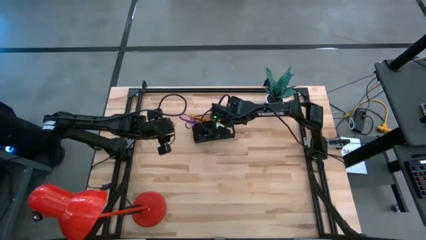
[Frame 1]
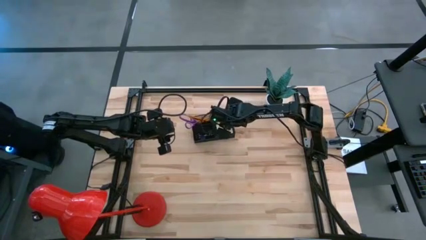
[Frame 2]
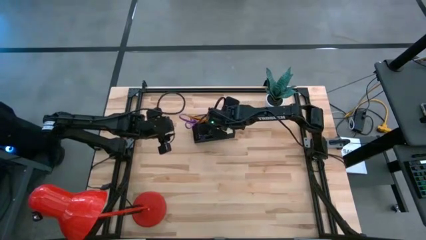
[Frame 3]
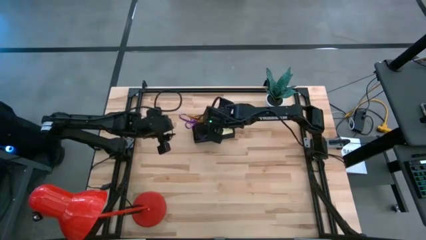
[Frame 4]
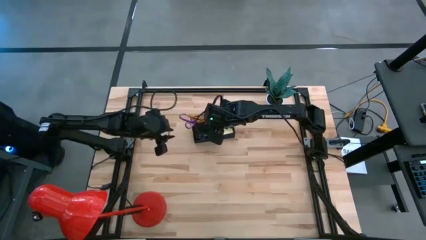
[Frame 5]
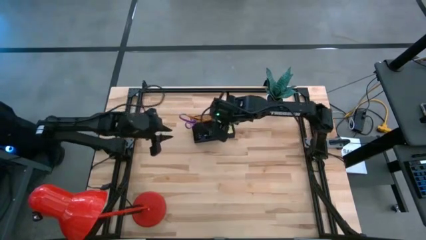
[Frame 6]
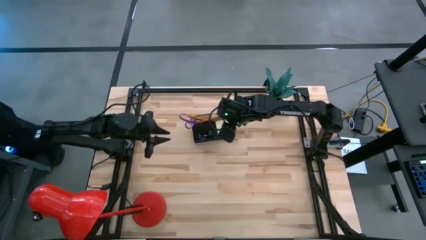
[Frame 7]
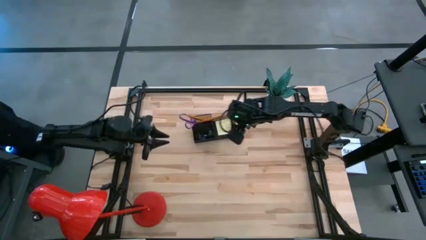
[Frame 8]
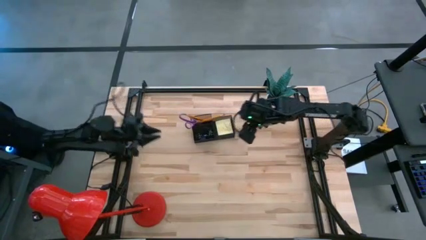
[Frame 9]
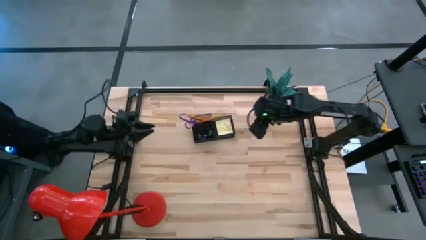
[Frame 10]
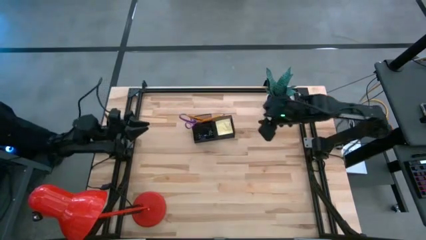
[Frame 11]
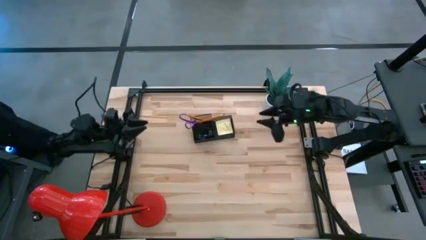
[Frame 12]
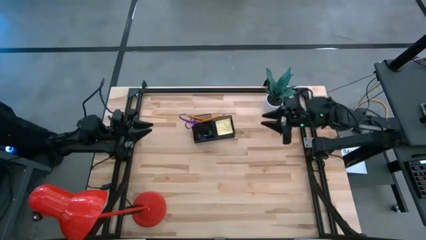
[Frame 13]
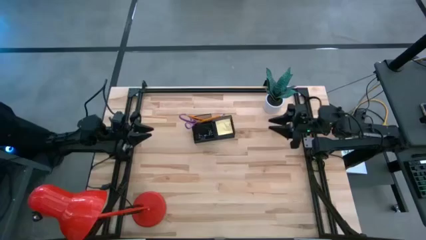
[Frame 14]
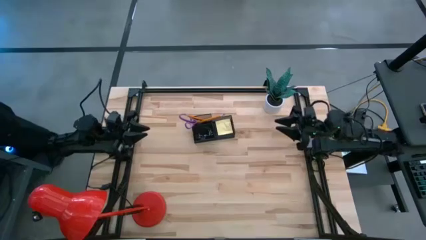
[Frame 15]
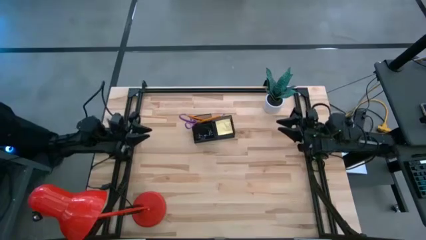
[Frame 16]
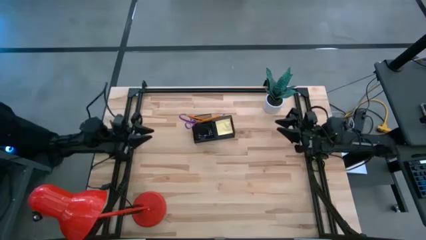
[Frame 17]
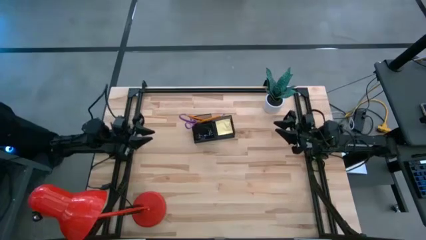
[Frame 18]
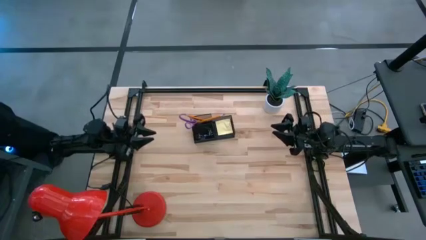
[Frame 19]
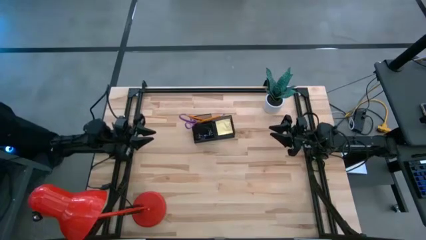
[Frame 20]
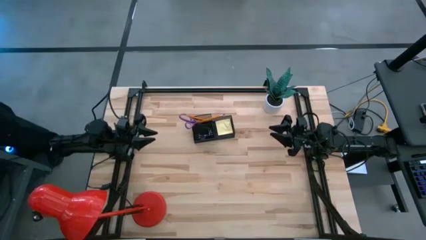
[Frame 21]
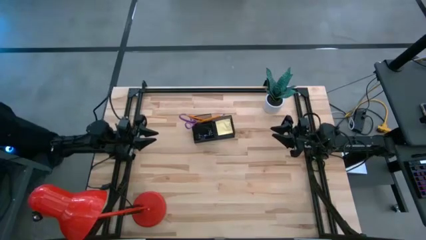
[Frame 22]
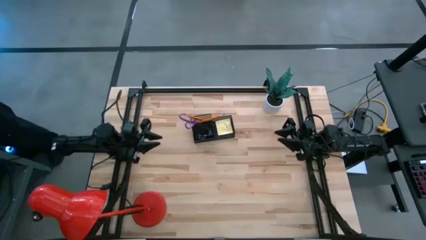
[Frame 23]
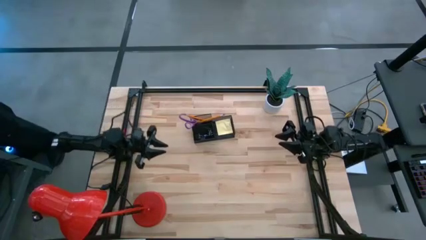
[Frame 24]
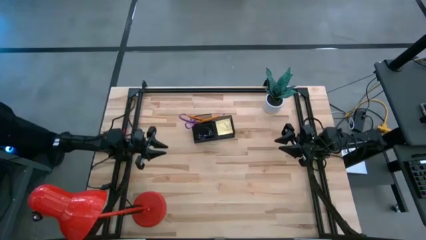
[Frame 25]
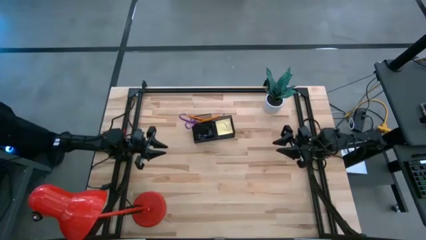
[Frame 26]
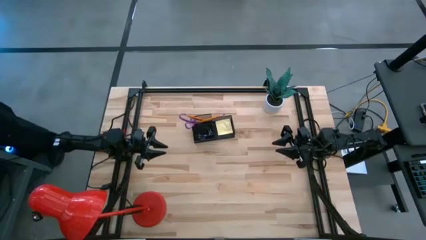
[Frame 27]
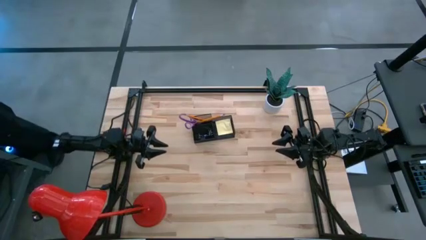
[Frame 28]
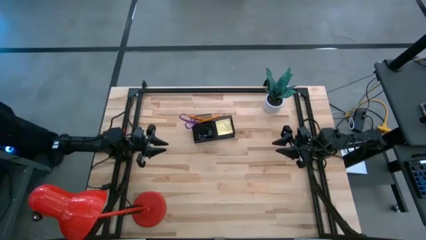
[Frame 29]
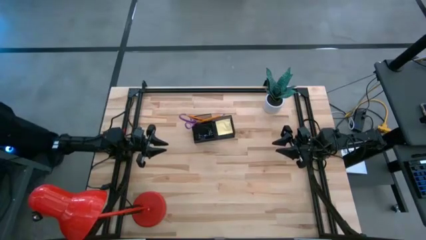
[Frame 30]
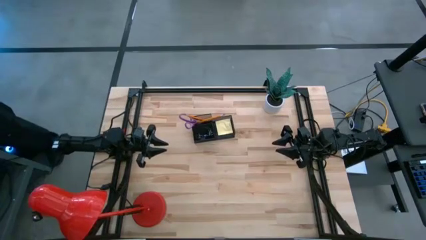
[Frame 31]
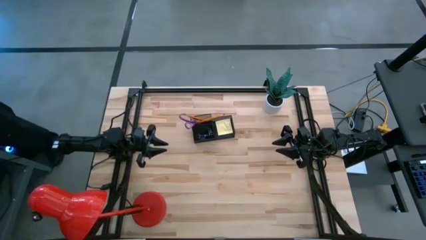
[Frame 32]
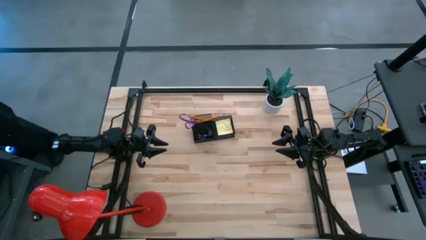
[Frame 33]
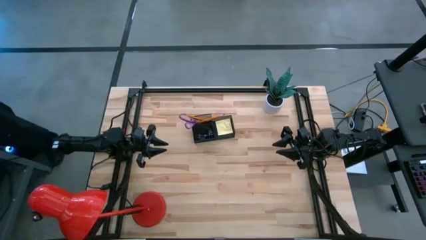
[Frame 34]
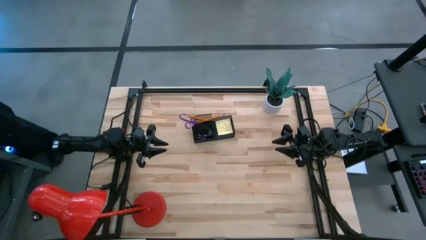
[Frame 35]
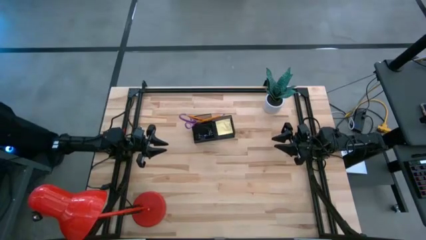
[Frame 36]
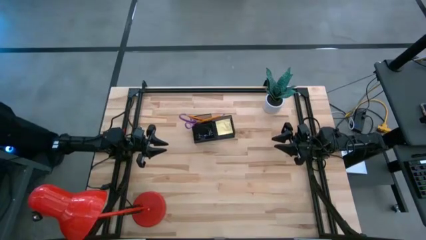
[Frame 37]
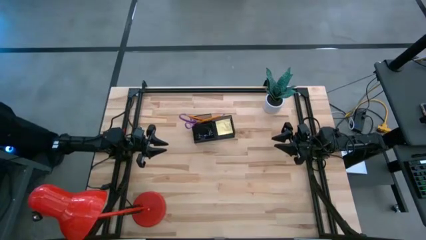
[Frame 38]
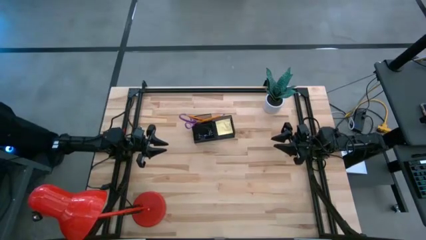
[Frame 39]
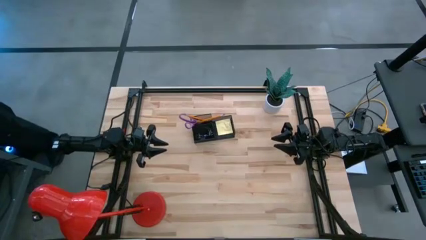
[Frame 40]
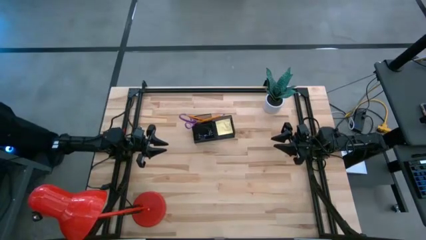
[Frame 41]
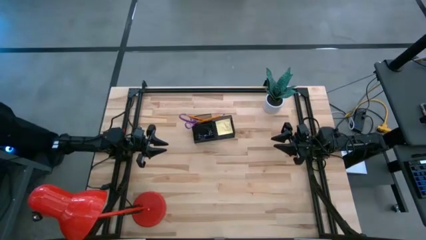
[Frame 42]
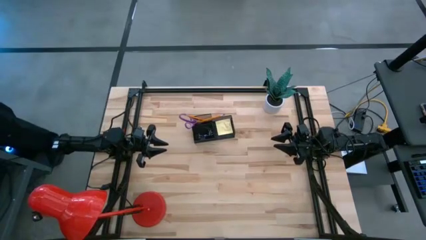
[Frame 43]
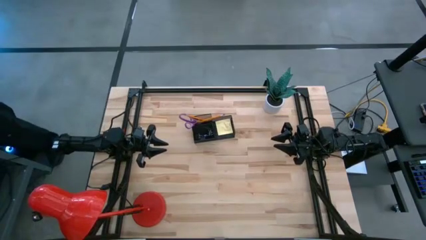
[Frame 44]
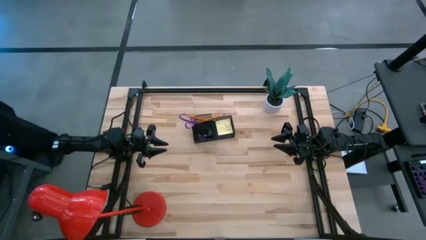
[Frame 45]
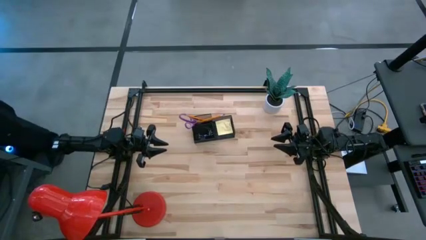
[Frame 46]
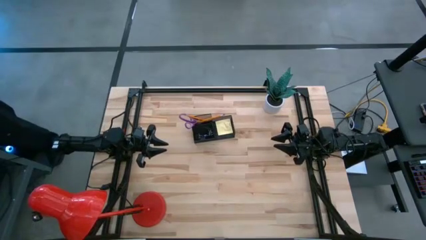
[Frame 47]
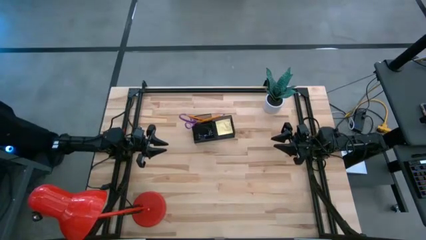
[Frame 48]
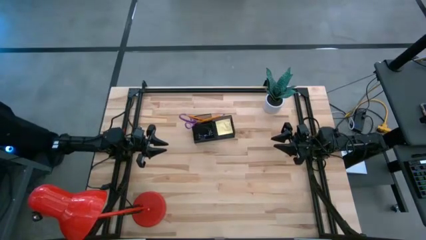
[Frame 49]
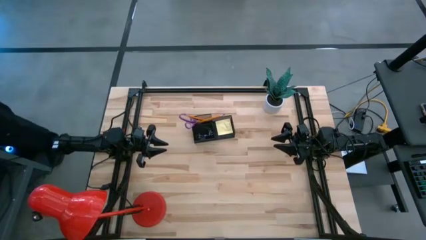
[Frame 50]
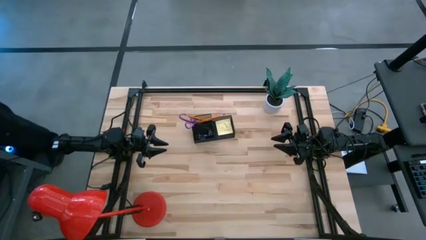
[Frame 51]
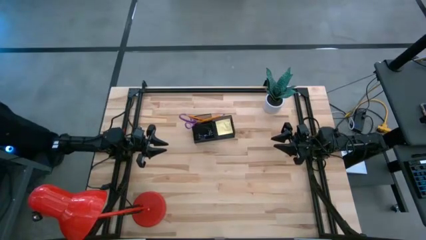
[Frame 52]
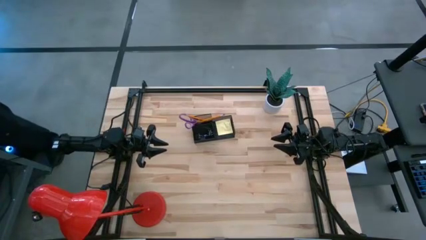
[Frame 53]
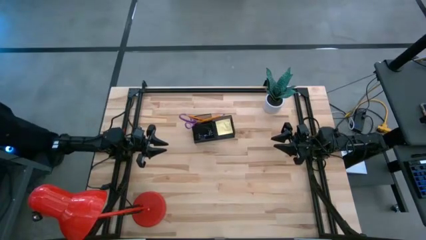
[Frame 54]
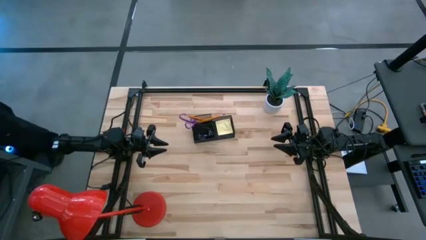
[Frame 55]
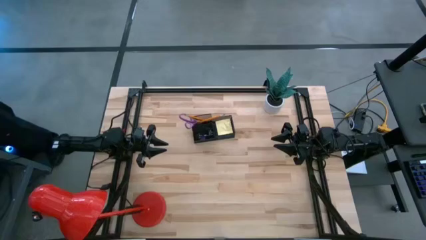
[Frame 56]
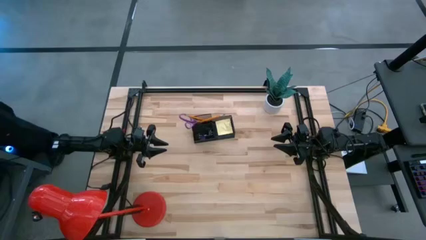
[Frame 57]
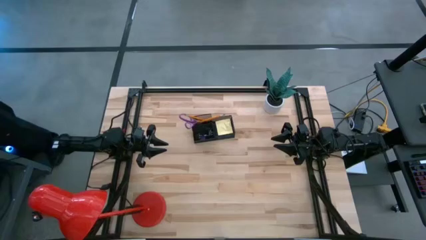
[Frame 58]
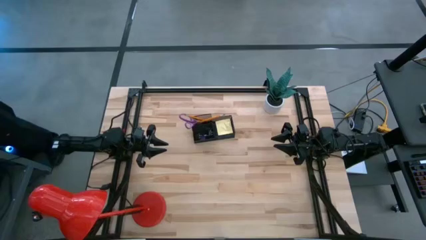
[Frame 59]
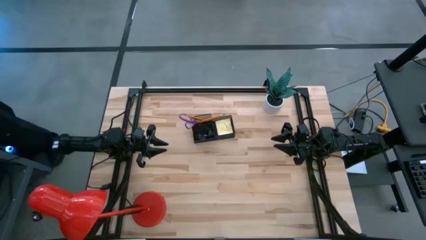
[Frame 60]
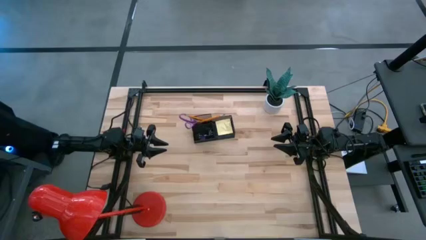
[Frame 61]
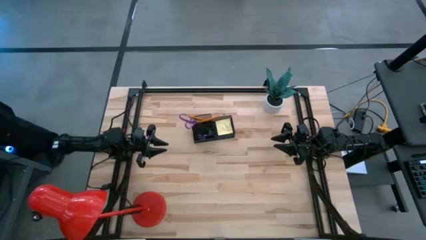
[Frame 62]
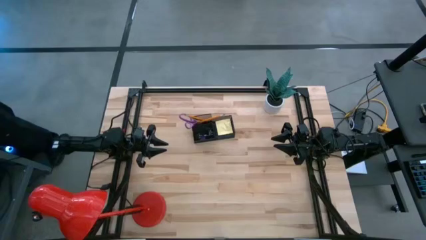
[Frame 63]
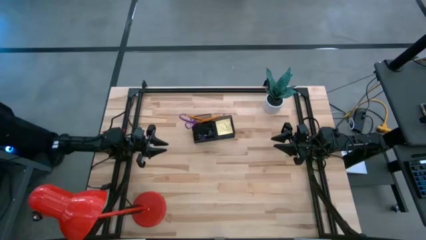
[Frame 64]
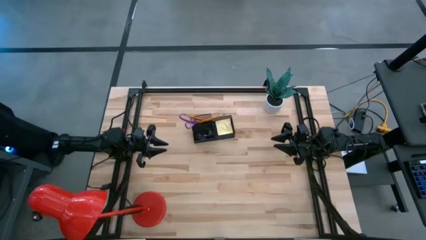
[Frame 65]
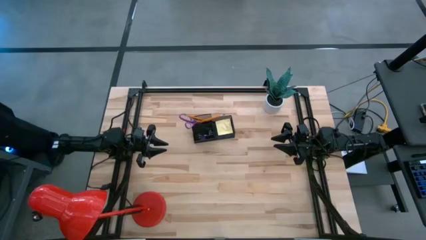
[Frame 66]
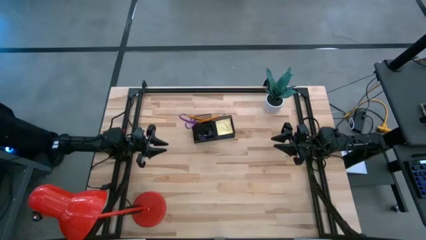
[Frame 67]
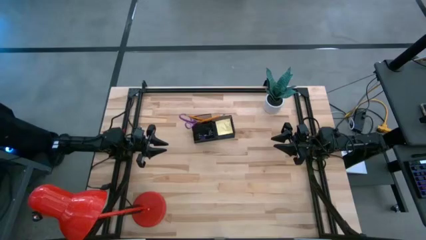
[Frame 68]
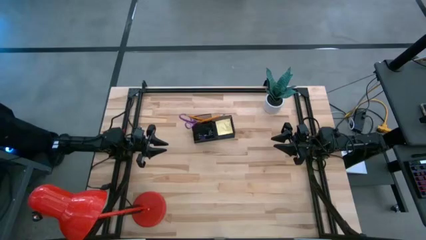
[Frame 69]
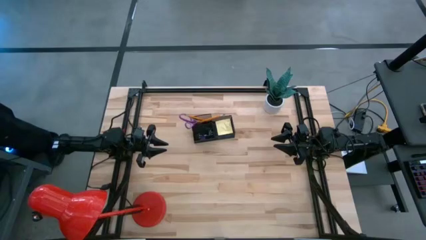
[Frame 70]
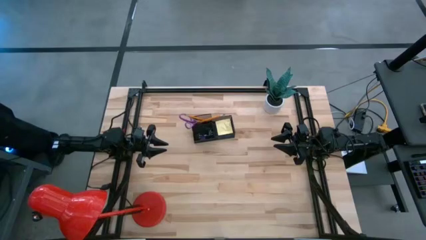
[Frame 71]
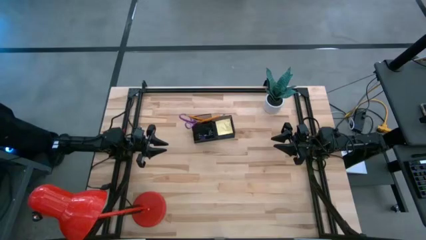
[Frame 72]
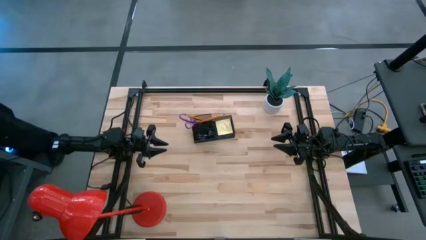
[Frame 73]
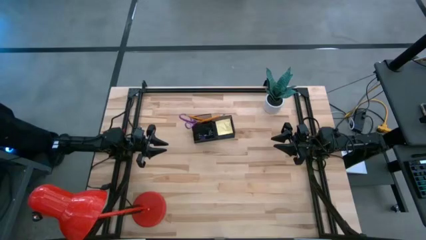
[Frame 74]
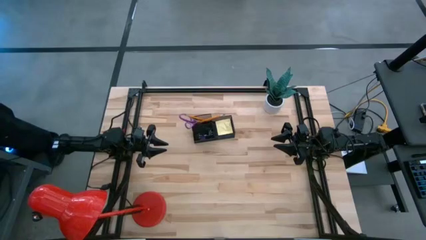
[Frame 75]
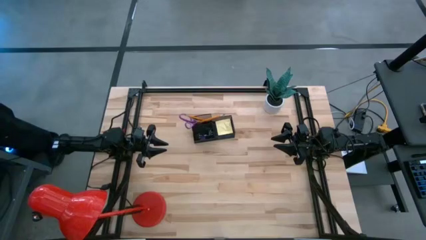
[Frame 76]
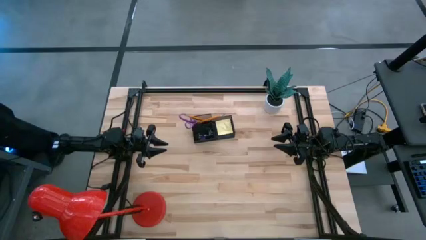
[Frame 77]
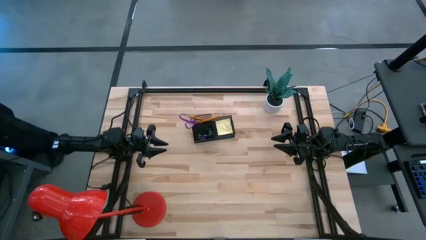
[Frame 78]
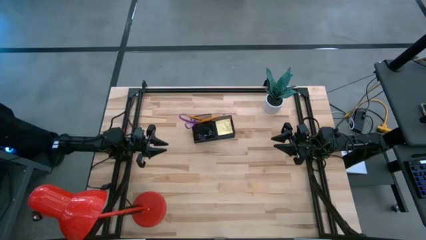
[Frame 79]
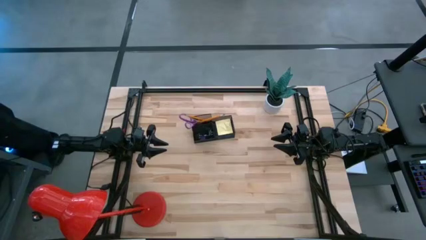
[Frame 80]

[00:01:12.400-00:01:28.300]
Task: Pick and place office supplies into organizer
Return to Home Position
